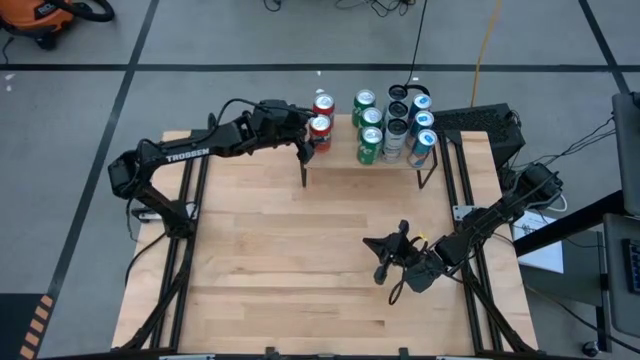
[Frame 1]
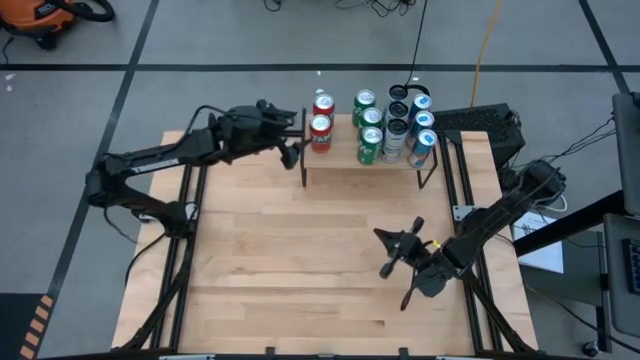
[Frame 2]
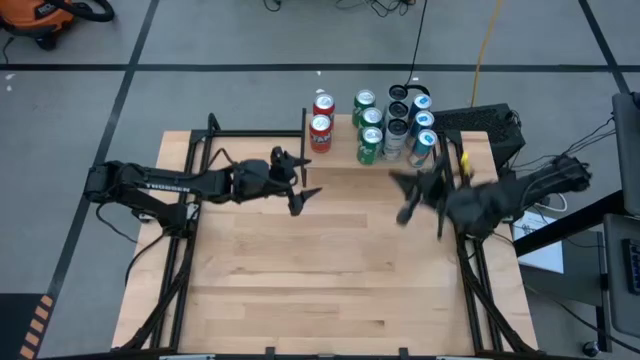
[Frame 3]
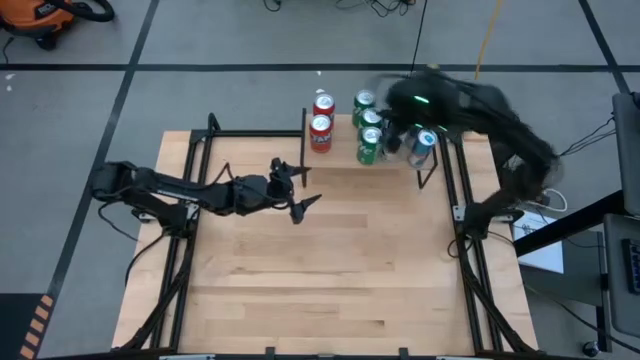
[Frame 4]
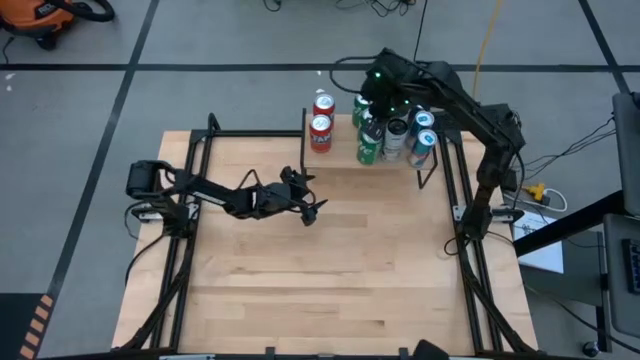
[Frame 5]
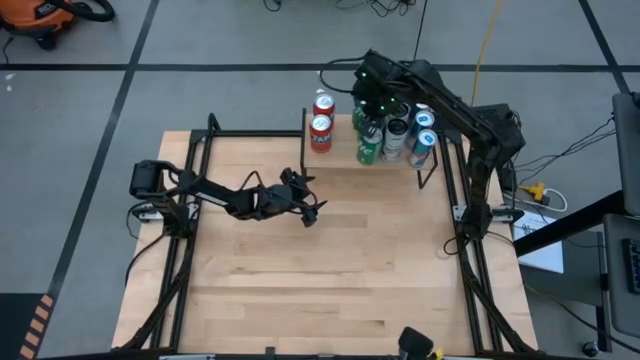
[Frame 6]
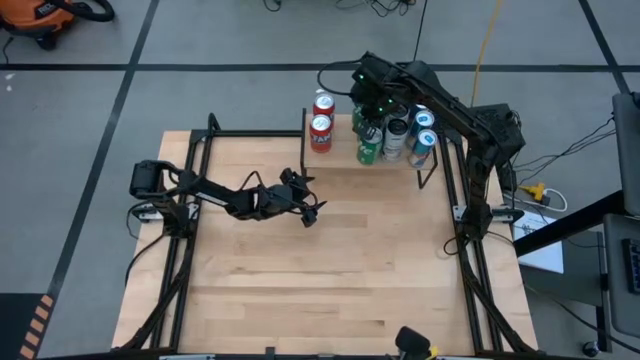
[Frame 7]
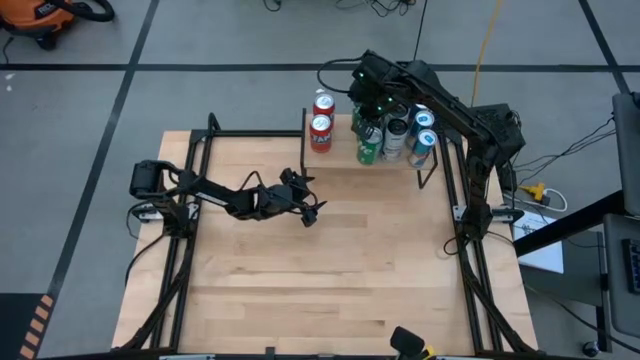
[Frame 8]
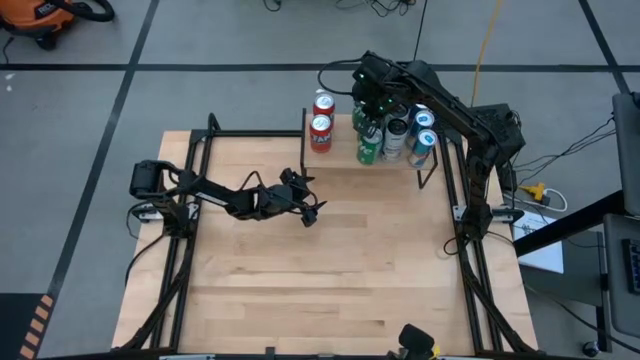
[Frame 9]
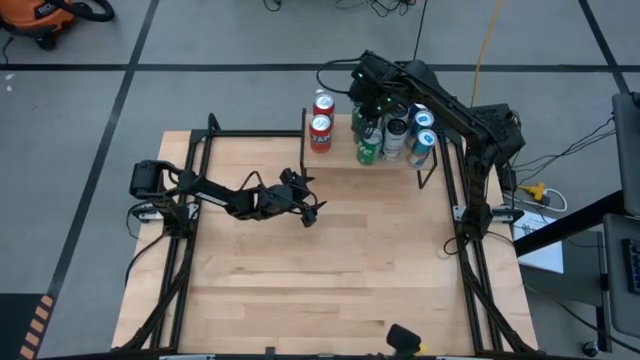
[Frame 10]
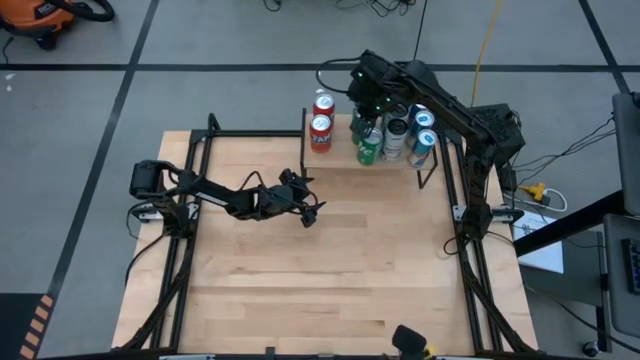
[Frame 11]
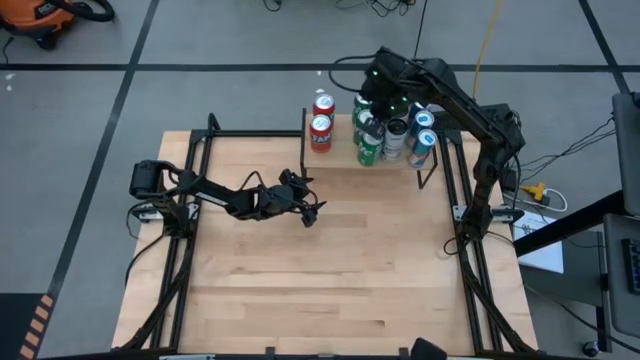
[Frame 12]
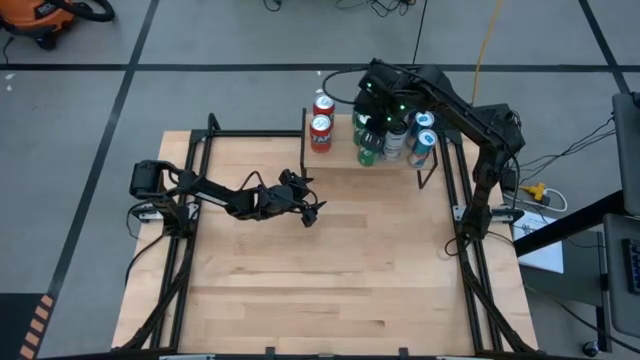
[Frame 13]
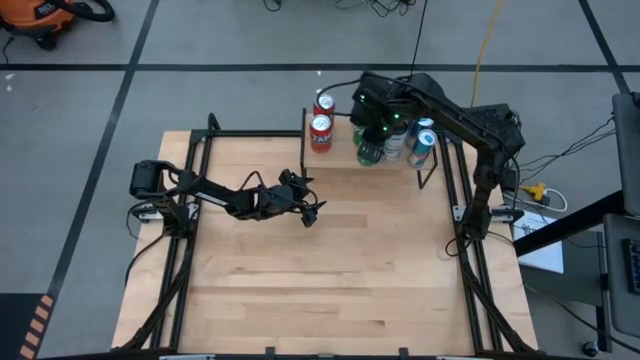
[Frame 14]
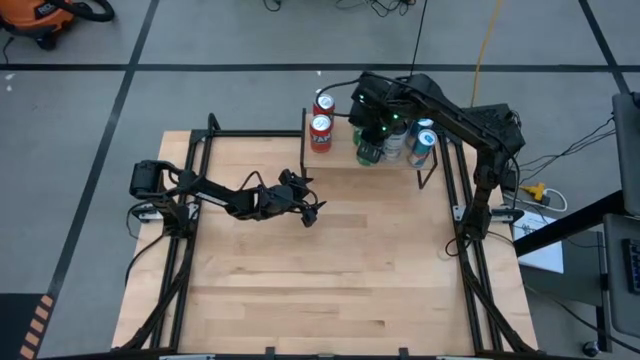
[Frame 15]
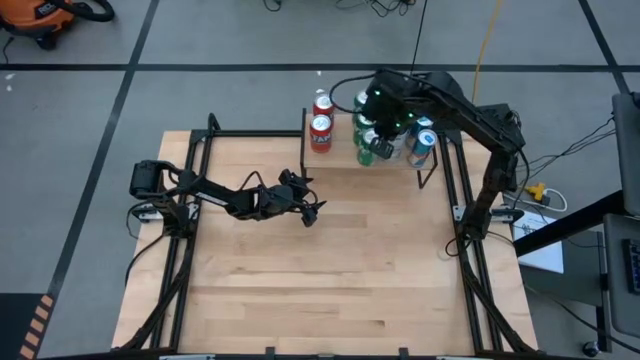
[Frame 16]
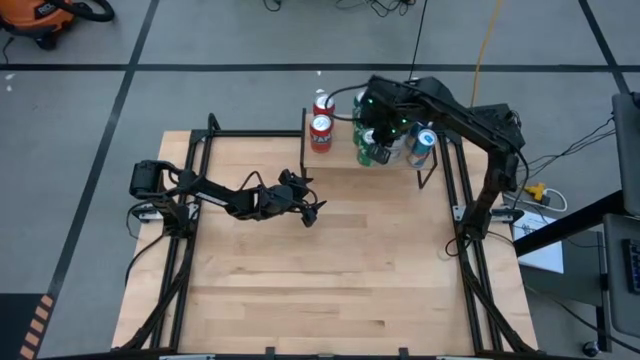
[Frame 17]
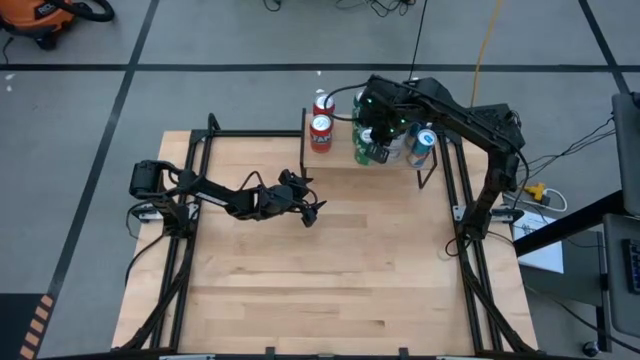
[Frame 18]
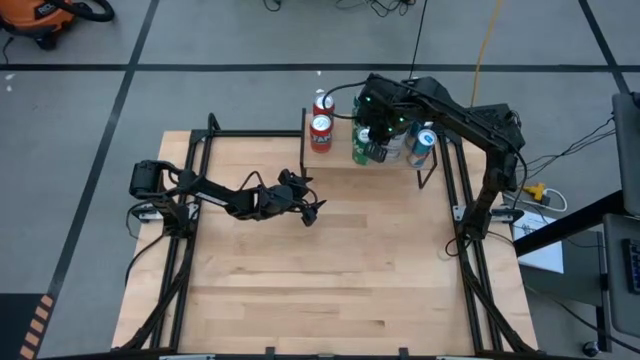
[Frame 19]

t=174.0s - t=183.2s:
Task: Place canned beverage on shelf
Adjust the green soda cans on the shelf

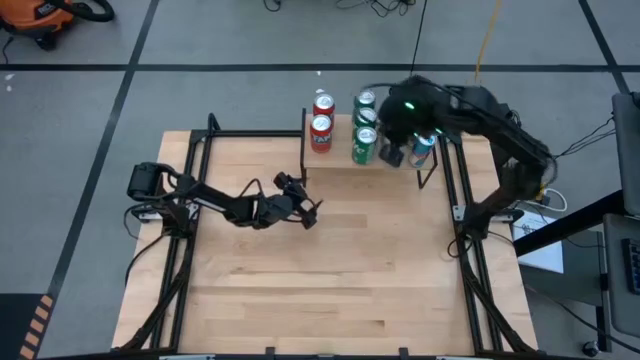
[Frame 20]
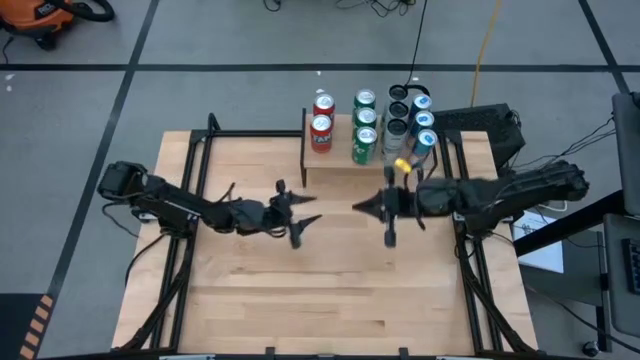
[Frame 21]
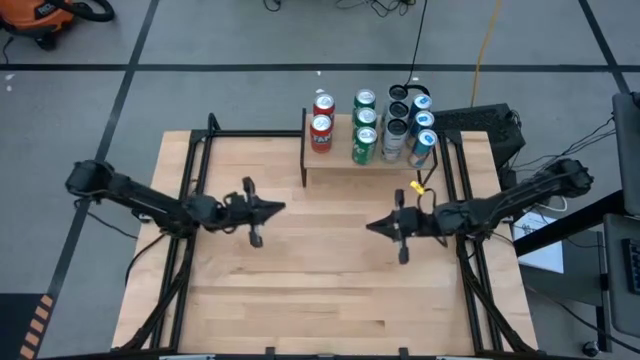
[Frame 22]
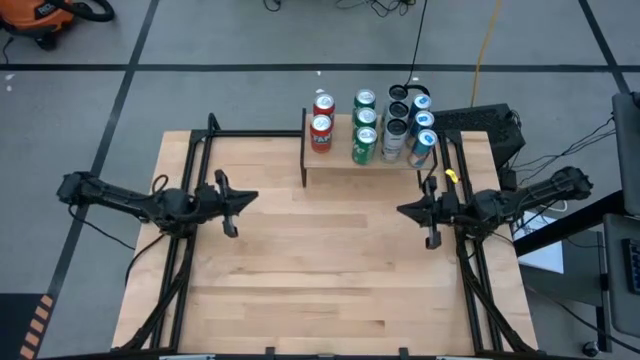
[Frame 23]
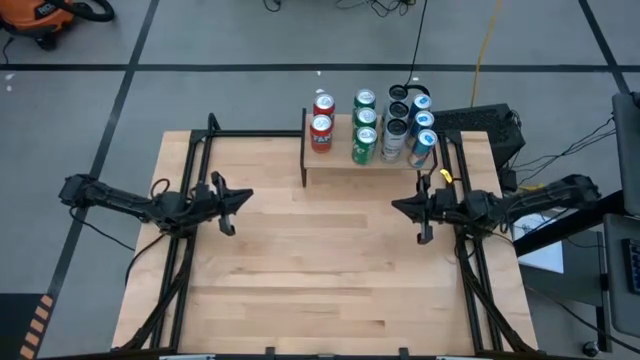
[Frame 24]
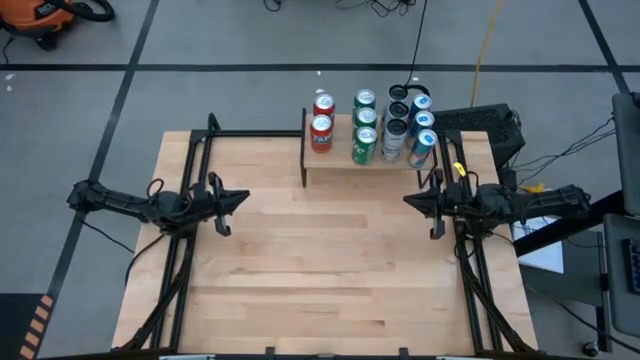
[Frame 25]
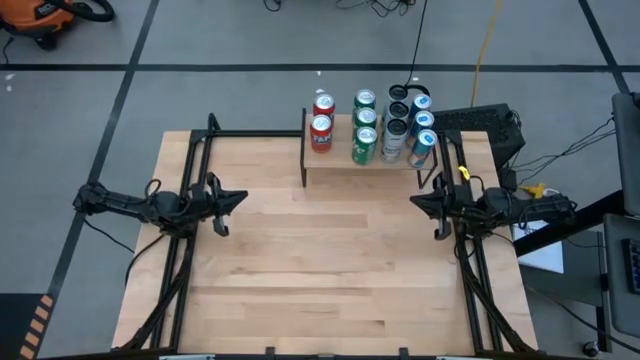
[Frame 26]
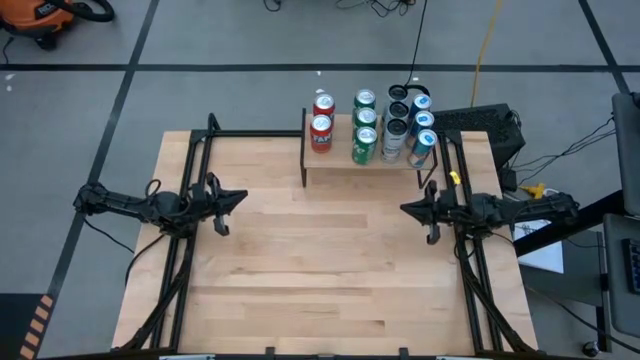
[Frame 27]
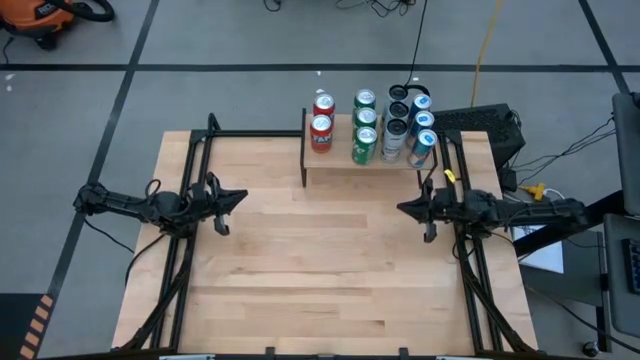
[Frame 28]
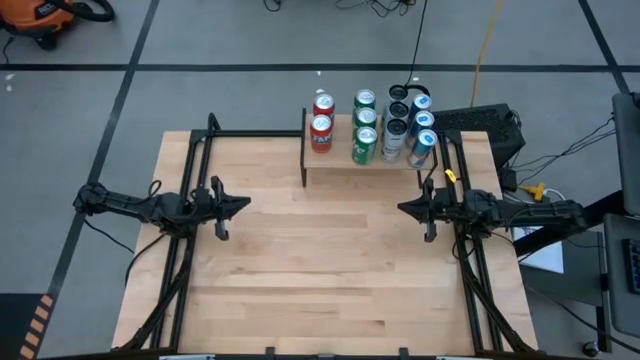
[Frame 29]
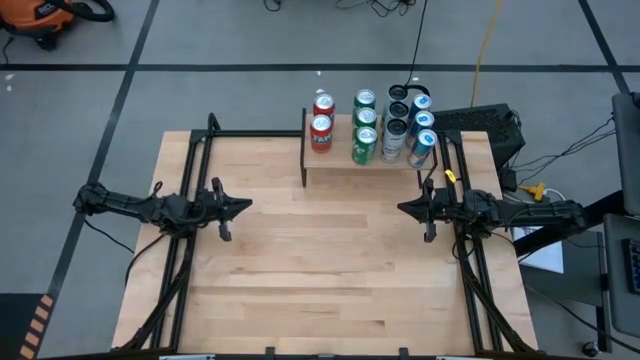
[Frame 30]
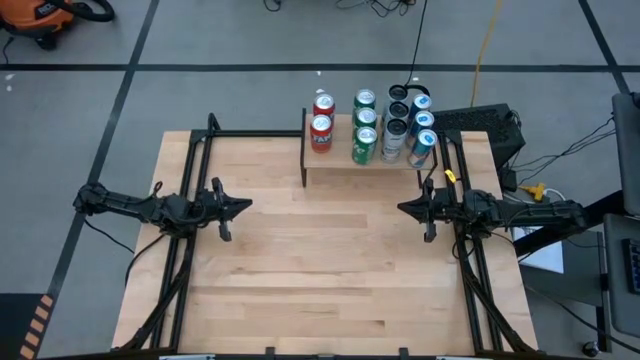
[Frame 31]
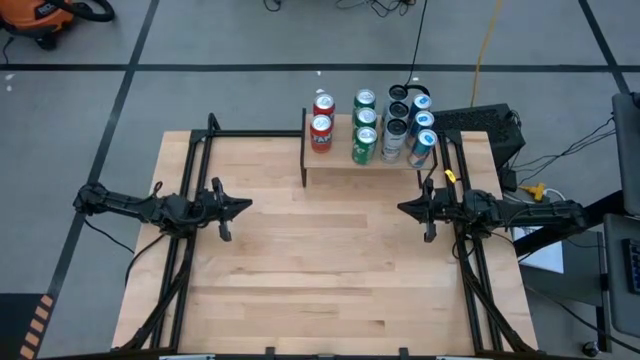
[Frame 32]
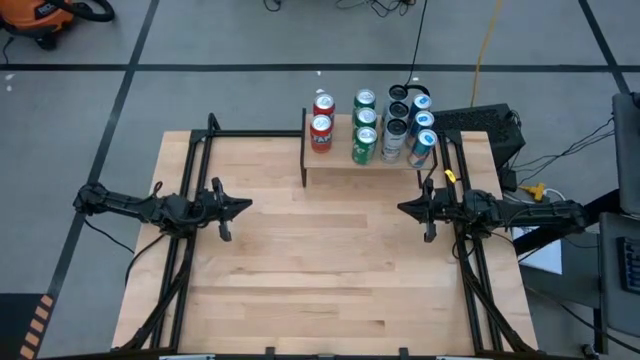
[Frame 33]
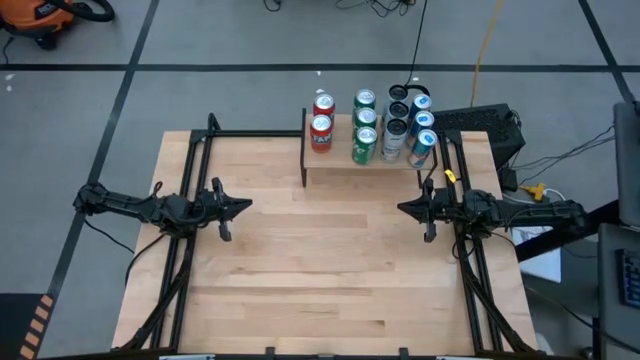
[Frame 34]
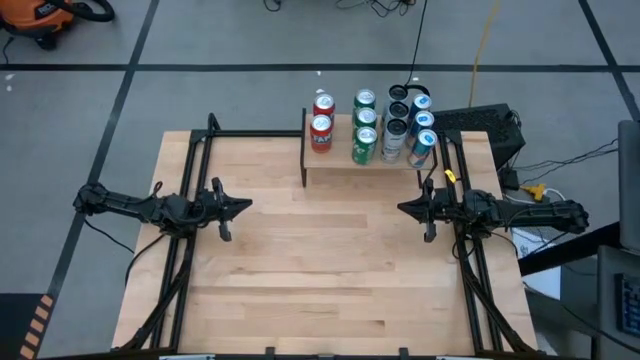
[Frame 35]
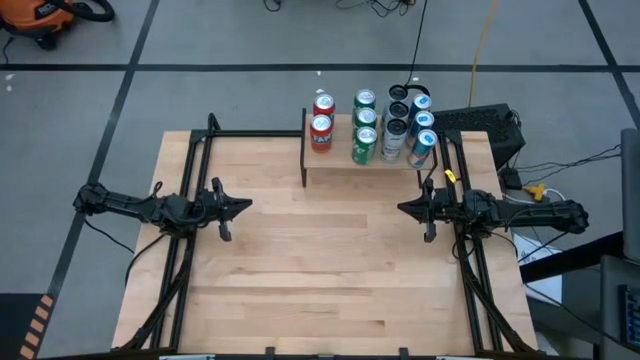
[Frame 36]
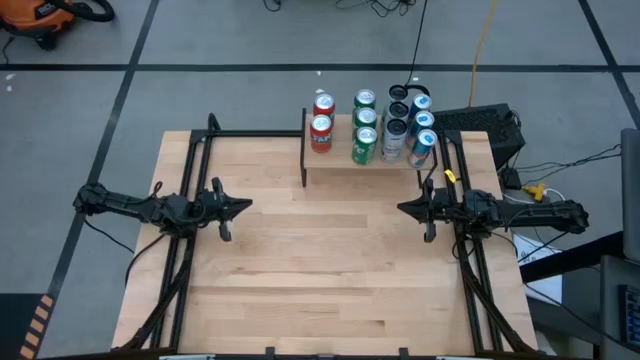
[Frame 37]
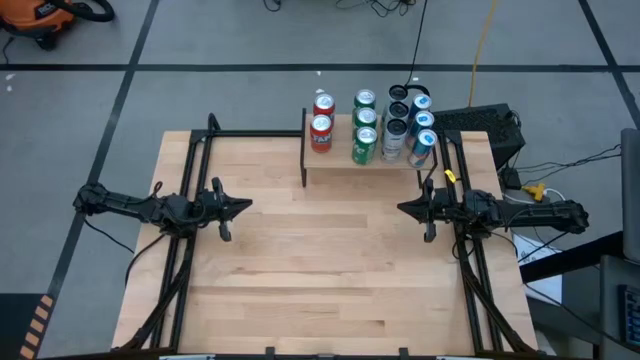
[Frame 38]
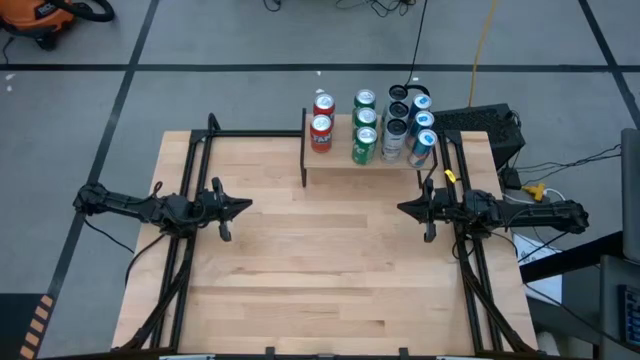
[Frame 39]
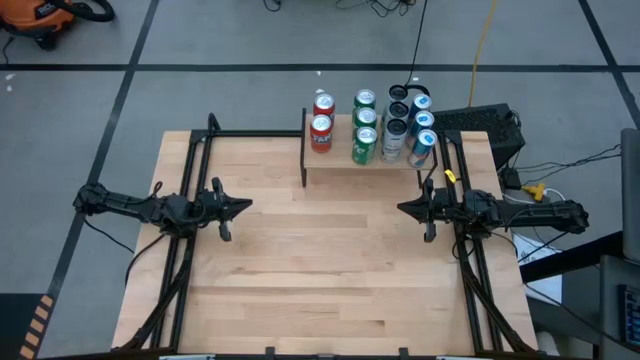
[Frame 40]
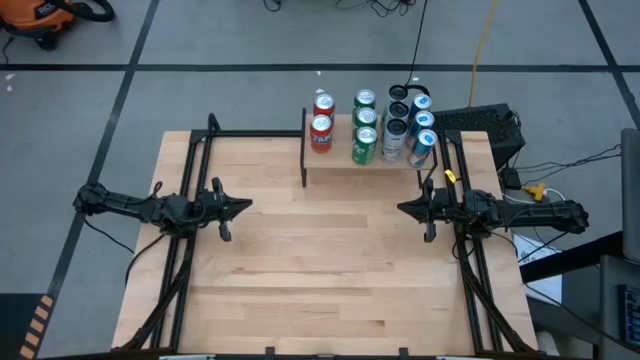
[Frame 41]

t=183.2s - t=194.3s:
Return to Home Position
